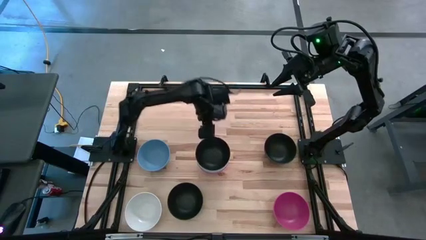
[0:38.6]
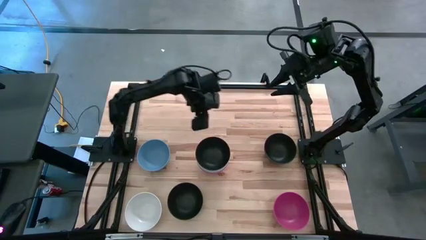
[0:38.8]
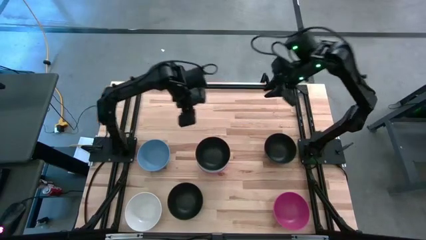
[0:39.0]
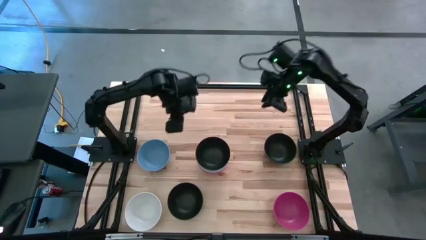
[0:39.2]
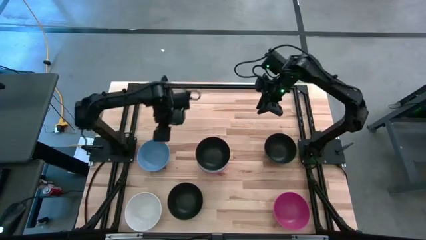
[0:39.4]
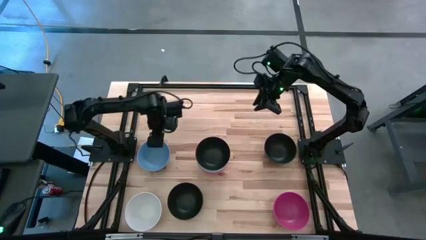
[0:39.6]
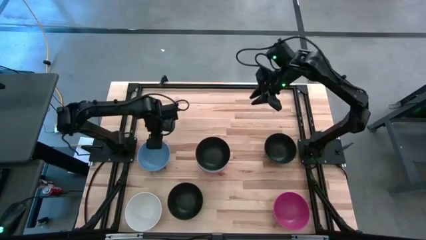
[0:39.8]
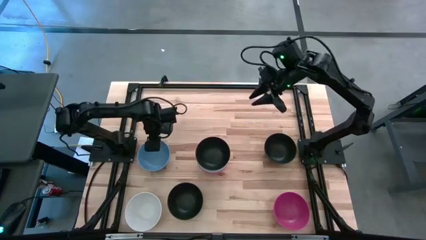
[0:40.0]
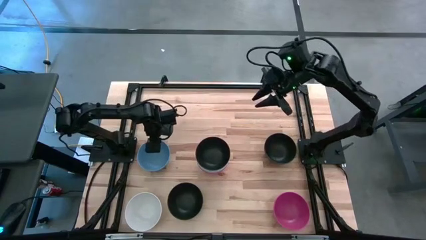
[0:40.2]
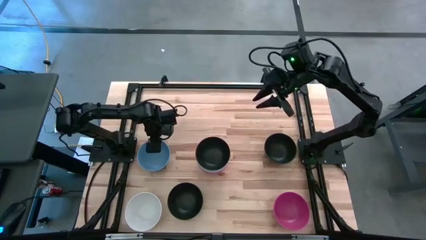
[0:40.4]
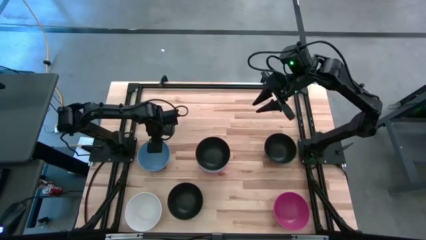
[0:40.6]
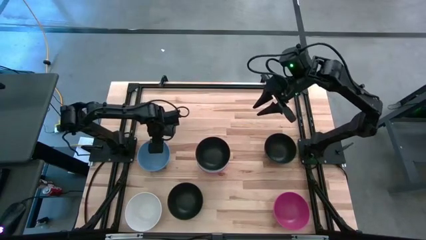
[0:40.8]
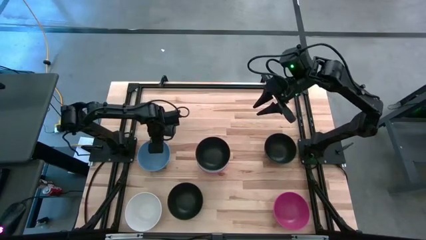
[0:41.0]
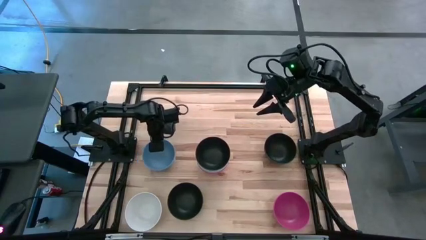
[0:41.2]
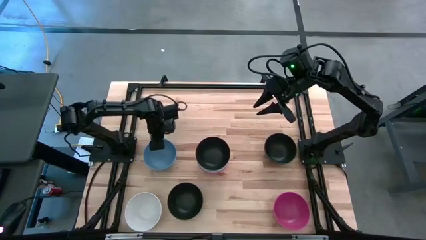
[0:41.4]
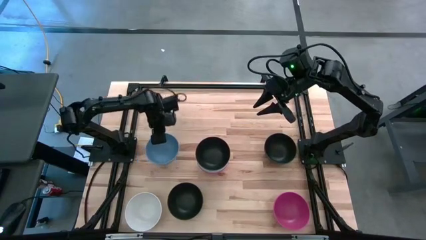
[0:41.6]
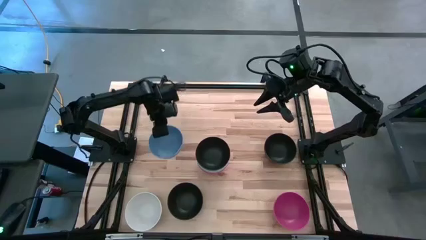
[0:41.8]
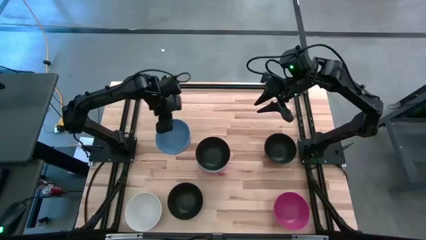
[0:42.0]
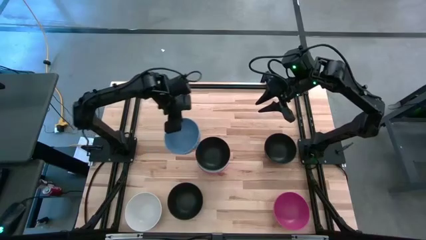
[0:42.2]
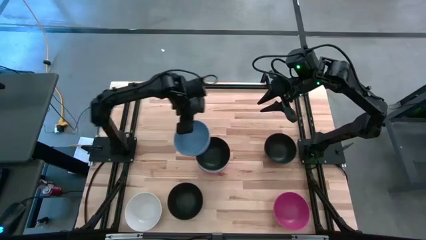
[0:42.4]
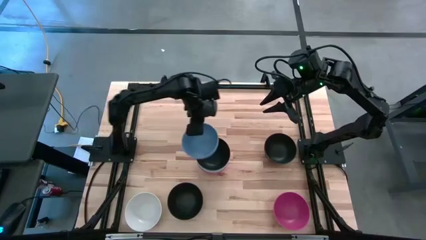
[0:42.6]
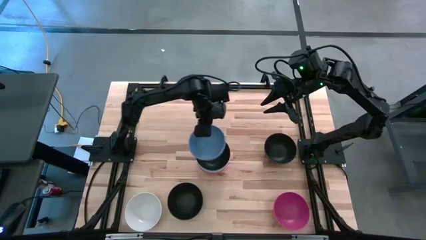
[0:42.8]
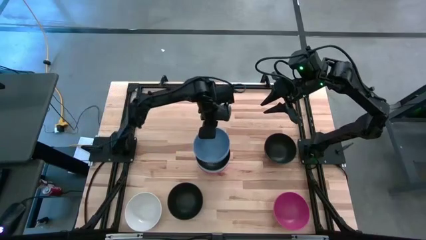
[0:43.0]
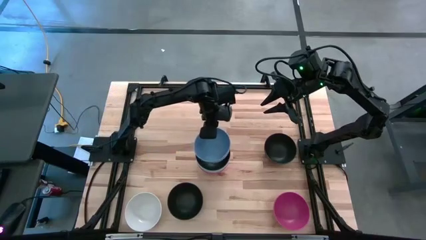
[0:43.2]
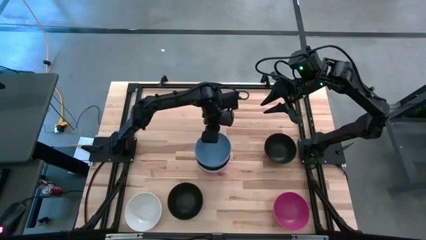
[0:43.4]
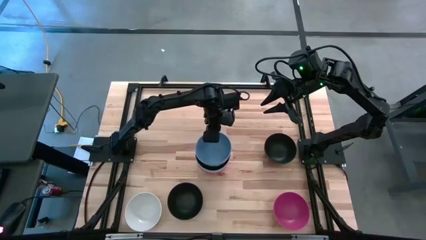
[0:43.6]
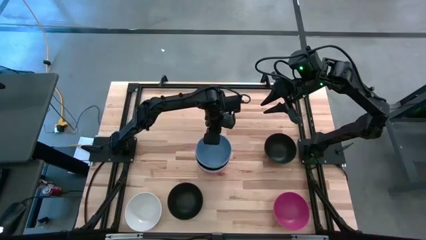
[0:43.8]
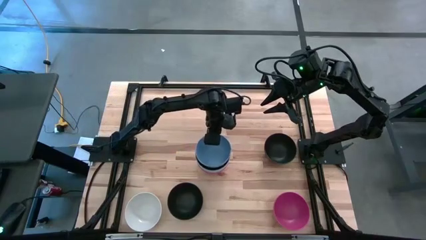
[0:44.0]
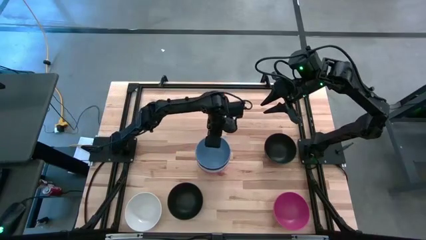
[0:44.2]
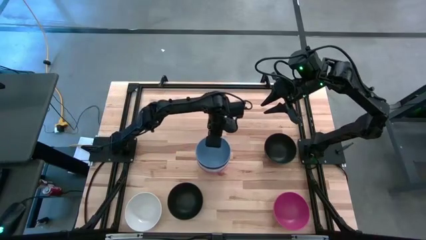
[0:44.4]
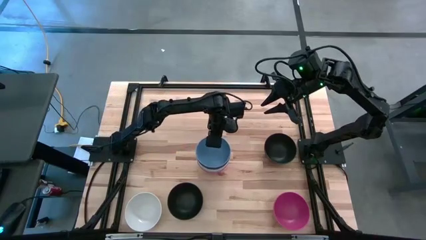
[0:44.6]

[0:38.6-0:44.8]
Task: Nest bowls inside each other
Stack the blue bowl on the black bowl

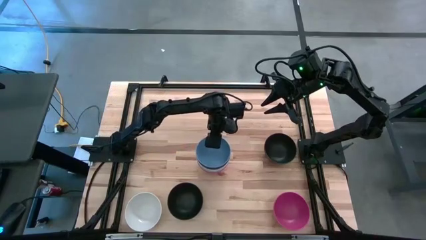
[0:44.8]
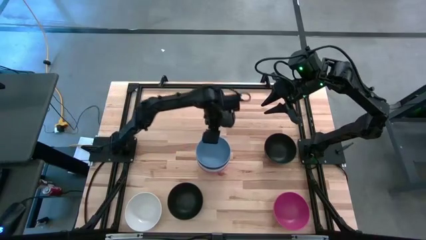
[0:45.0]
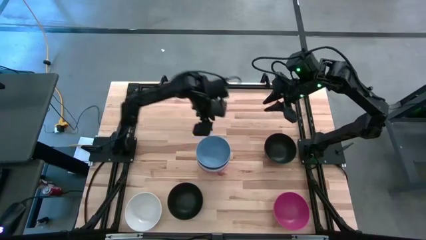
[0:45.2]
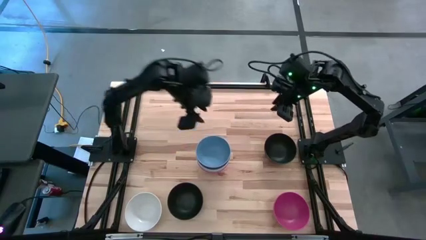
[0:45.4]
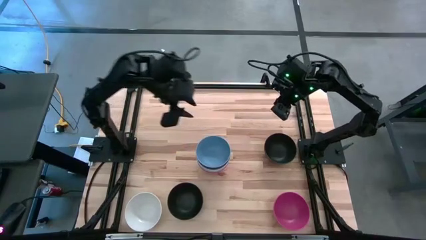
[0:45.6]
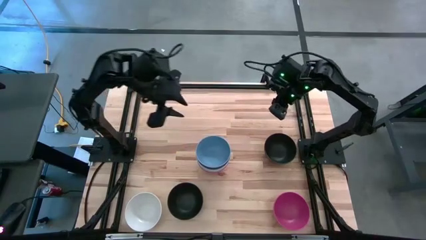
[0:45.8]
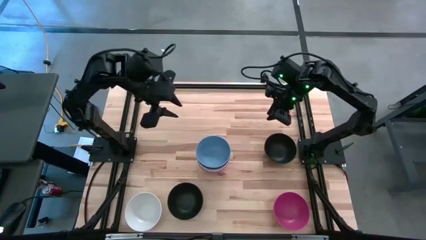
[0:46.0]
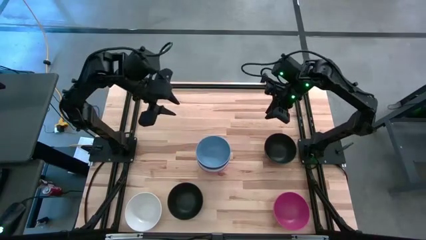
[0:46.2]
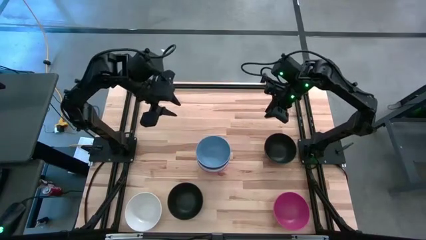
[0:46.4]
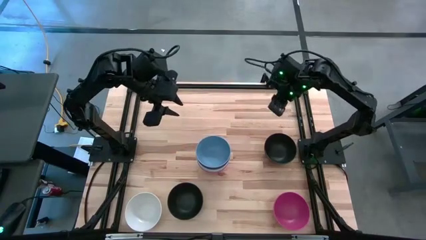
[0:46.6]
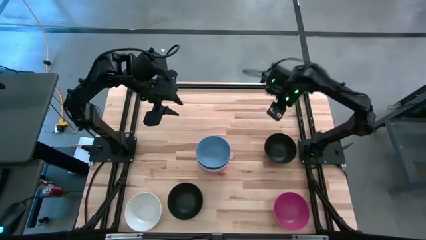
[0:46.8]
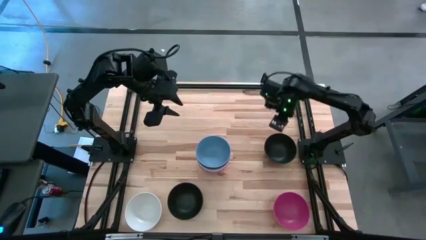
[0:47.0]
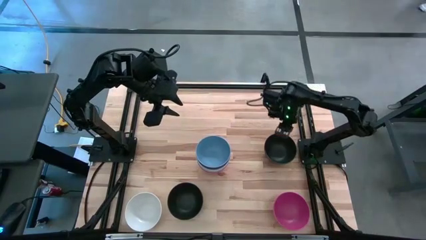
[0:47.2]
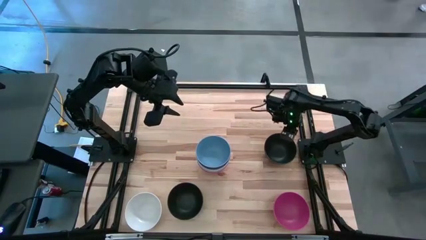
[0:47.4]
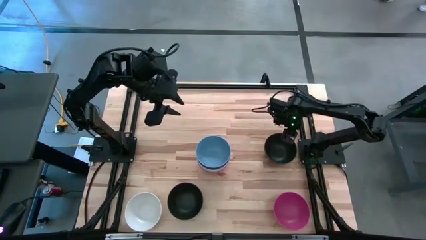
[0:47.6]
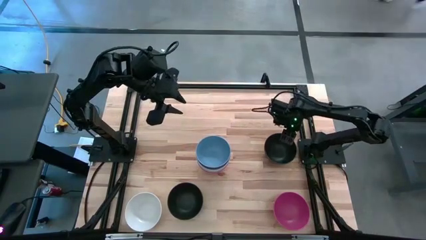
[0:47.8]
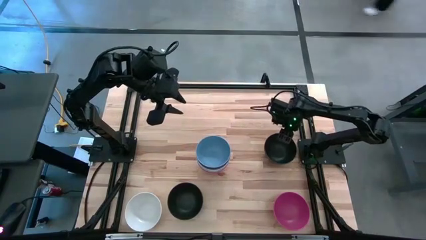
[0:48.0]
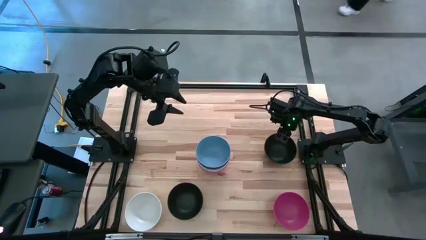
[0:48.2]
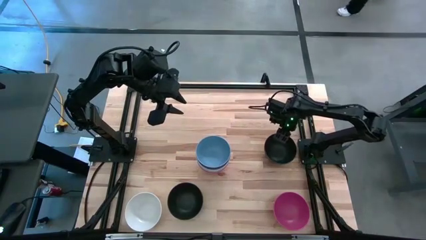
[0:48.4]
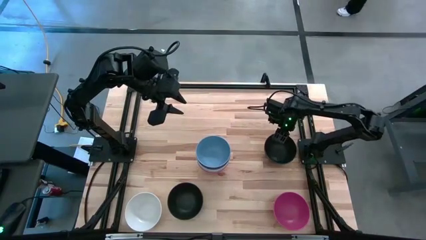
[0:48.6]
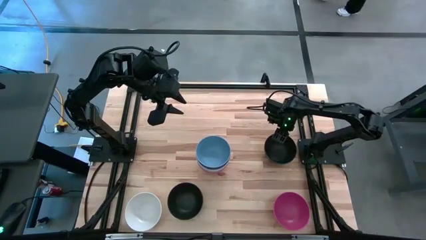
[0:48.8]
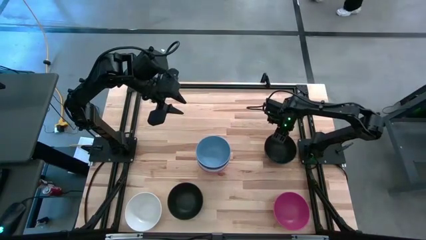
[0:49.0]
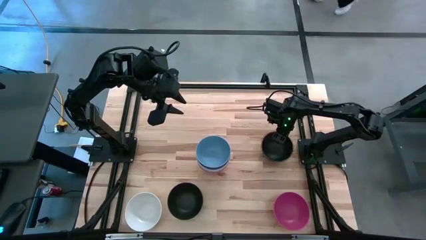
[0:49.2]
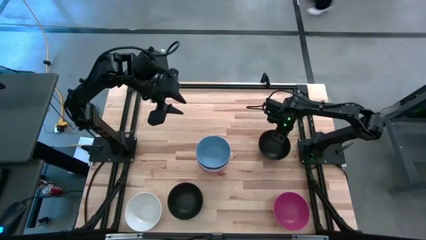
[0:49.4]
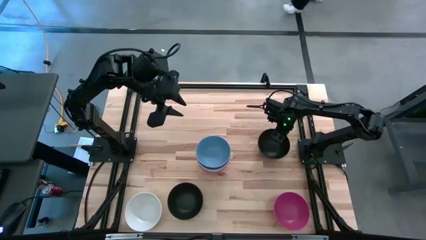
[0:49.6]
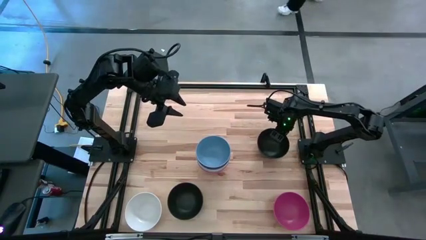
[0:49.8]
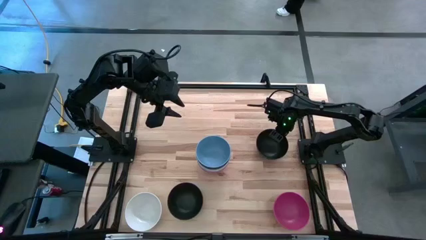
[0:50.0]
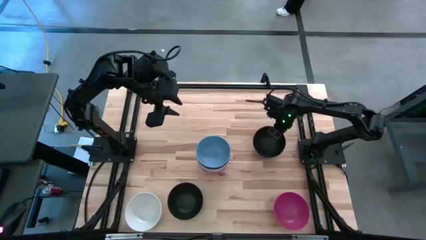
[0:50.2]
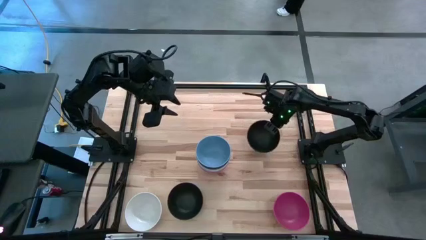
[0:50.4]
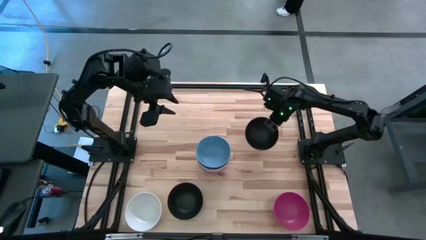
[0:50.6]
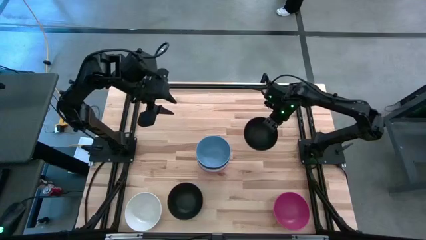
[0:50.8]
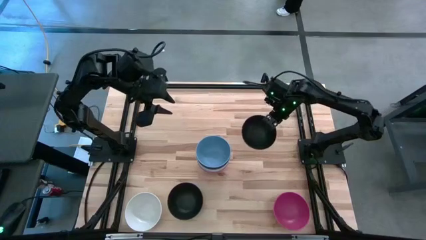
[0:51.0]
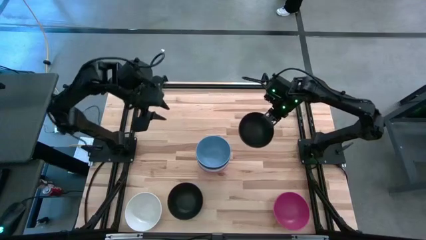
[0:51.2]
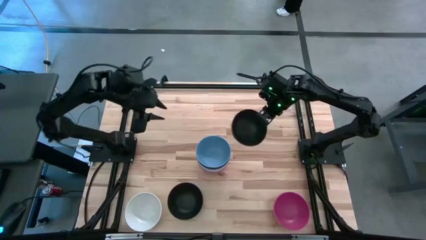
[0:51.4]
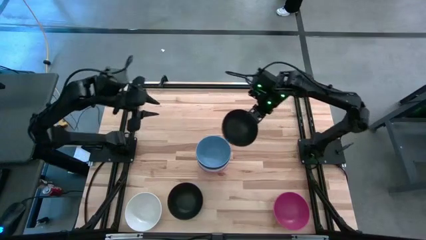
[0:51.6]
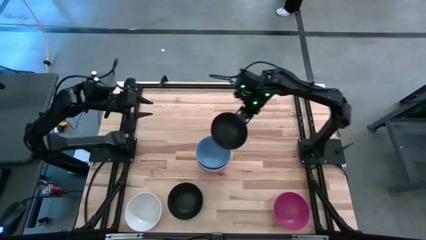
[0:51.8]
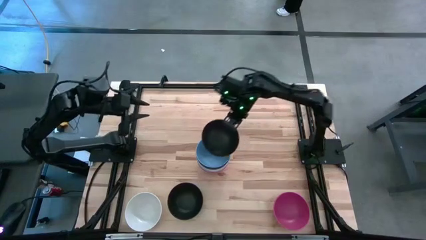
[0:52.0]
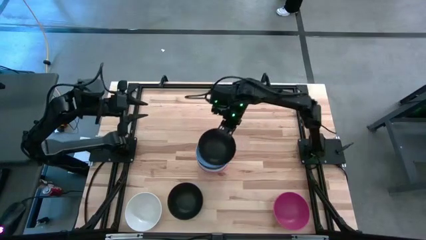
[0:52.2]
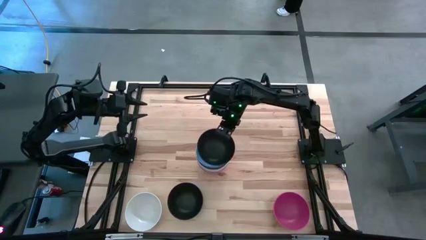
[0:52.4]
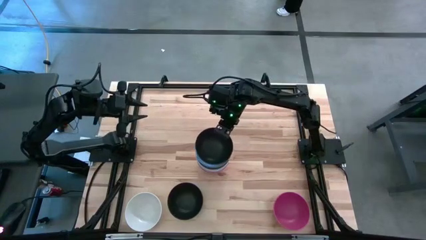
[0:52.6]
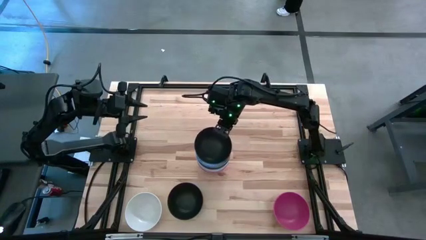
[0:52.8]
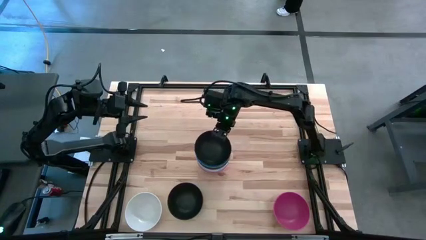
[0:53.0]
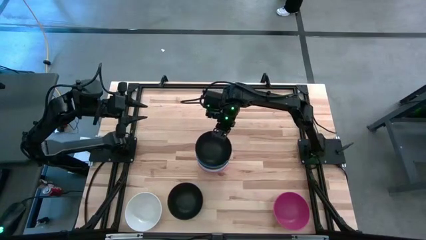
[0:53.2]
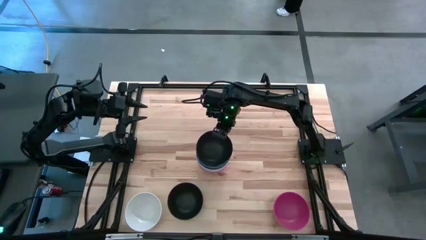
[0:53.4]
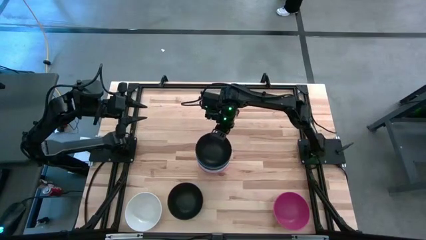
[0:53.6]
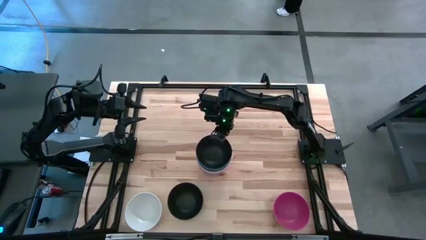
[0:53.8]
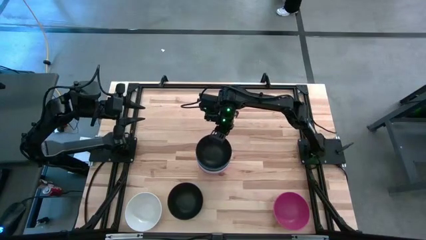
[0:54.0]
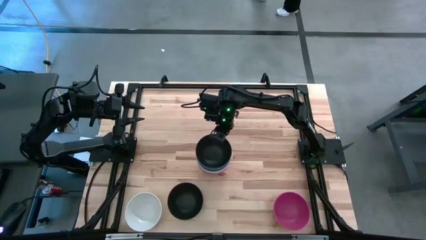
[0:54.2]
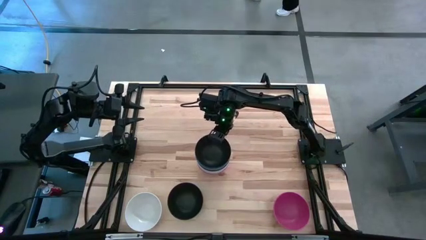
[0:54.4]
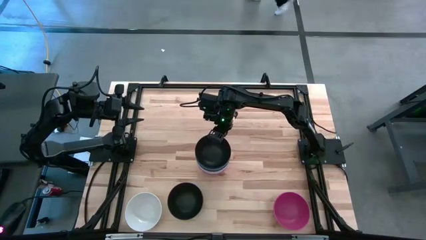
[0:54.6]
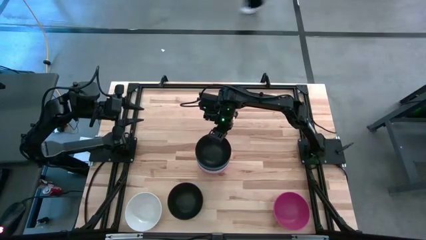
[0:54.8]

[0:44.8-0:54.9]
Stack the right black bowl on the blue bowl
